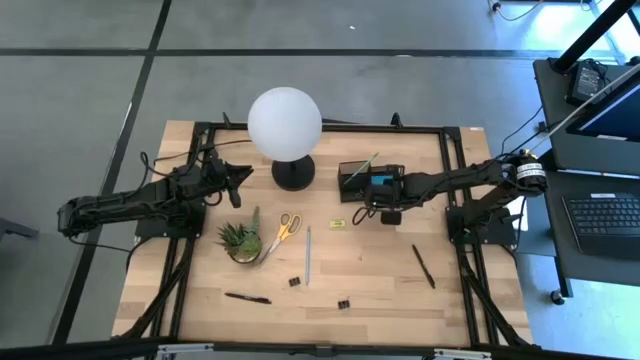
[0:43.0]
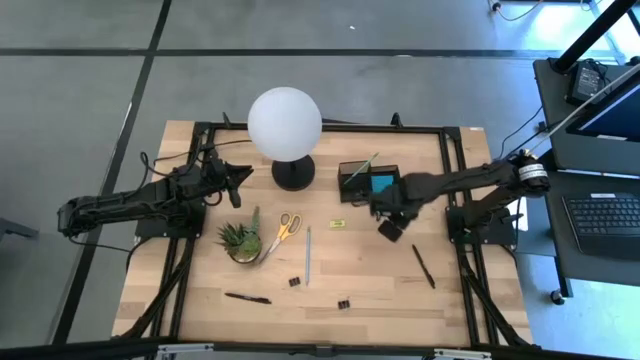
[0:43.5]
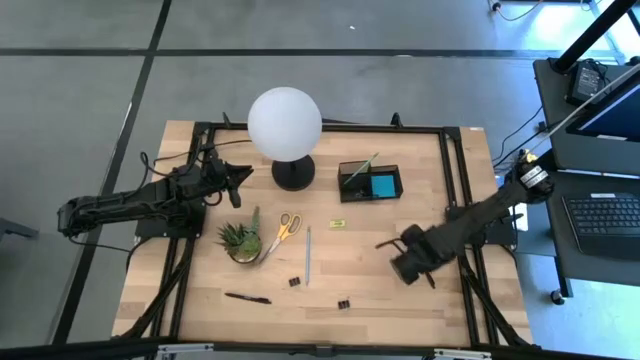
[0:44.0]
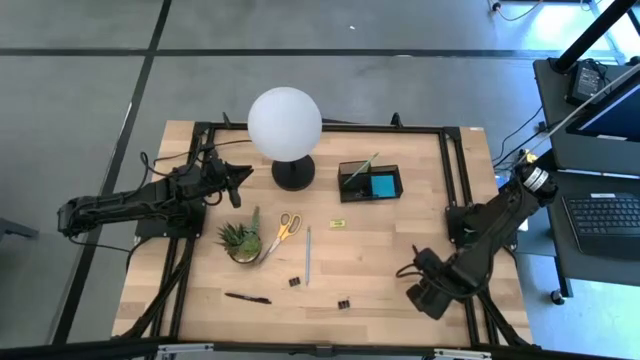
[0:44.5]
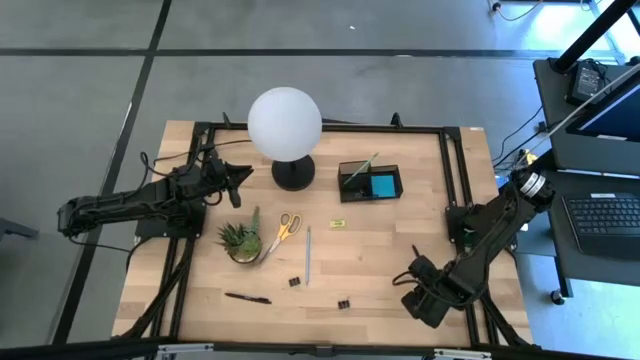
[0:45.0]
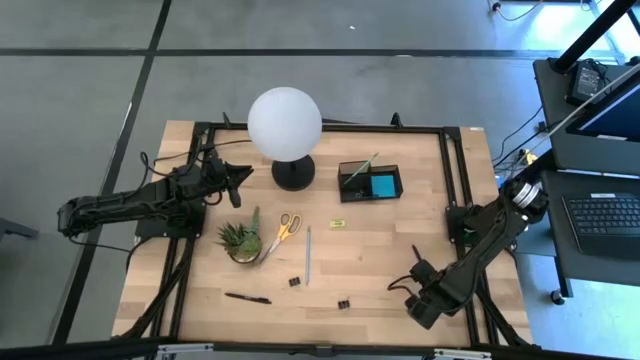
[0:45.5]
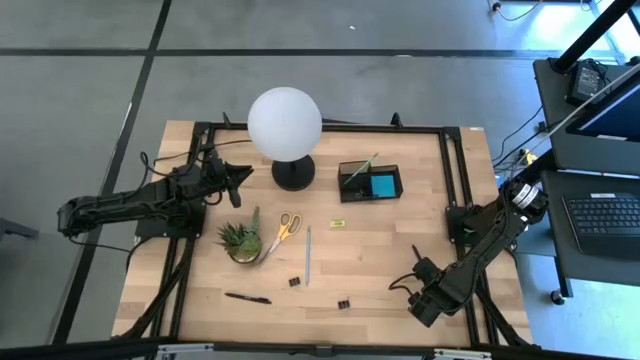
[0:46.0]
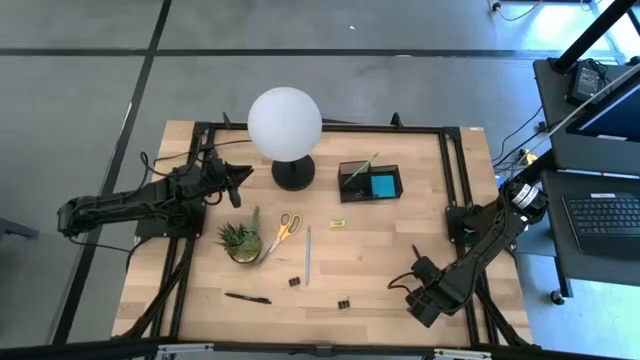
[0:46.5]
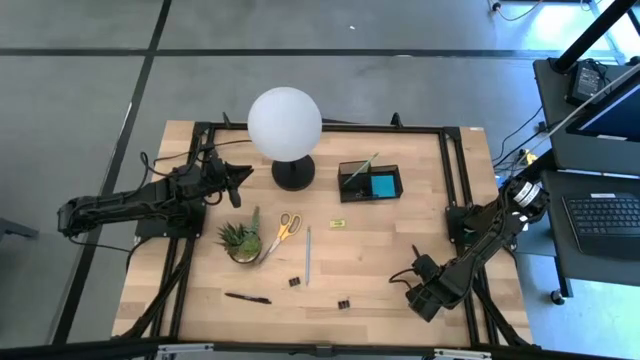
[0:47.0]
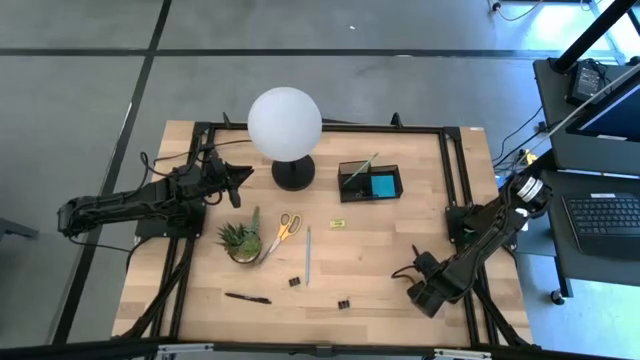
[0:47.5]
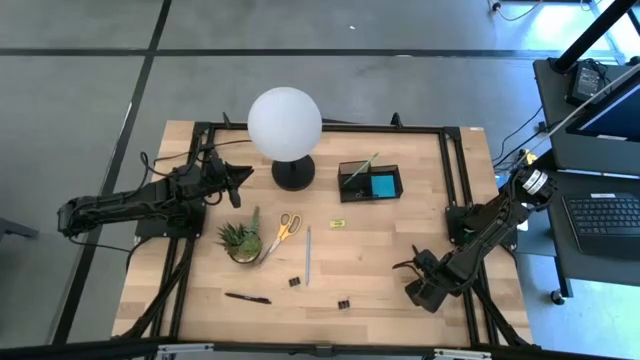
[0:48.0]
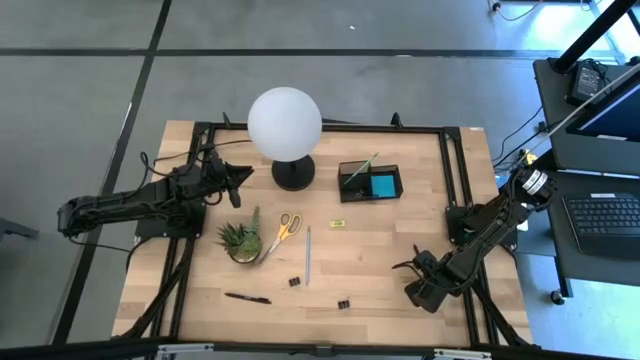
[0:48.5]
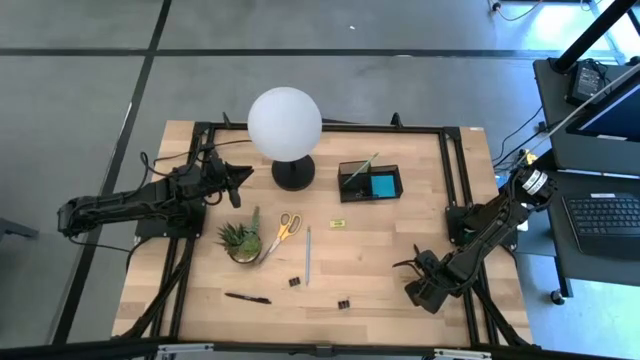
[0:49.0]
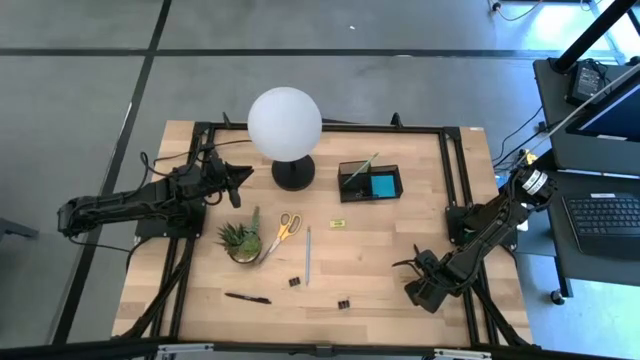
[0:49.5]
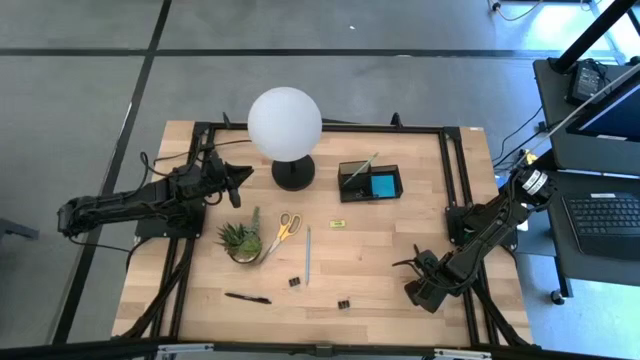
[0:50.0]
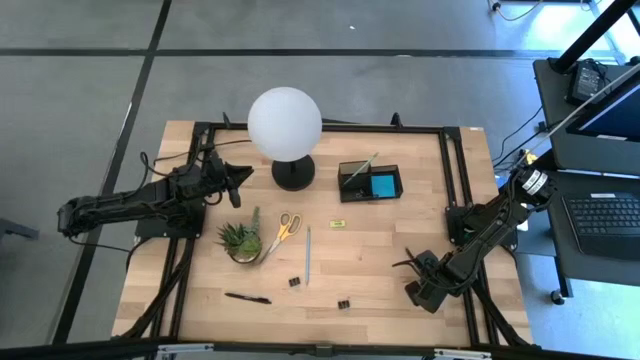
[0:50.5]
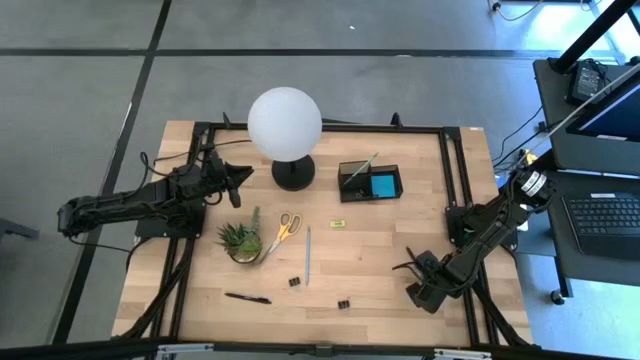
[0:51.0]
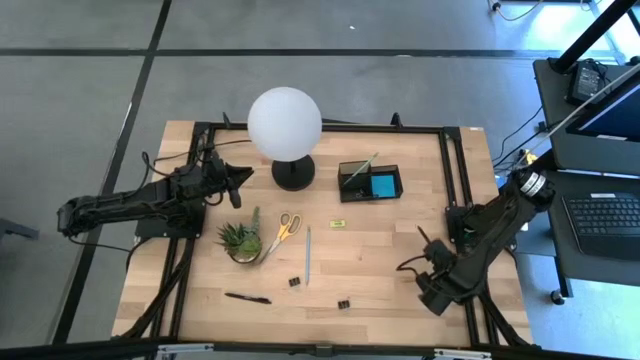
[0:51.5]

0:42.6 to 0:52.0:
Task: Pick and place office supplies into organizer
Put the right black pen into the desk organizer

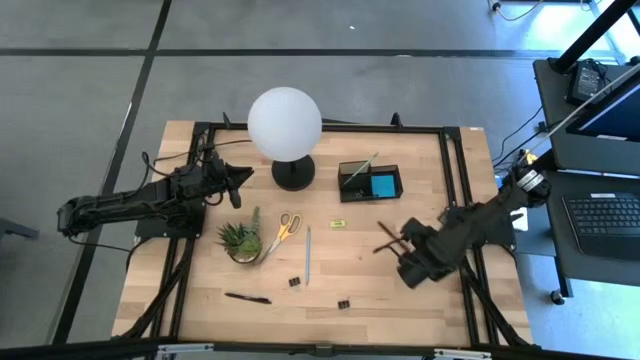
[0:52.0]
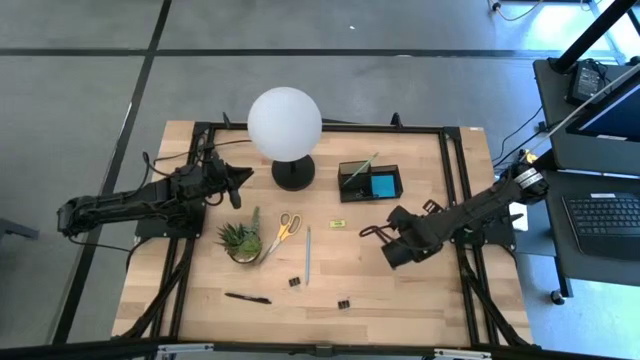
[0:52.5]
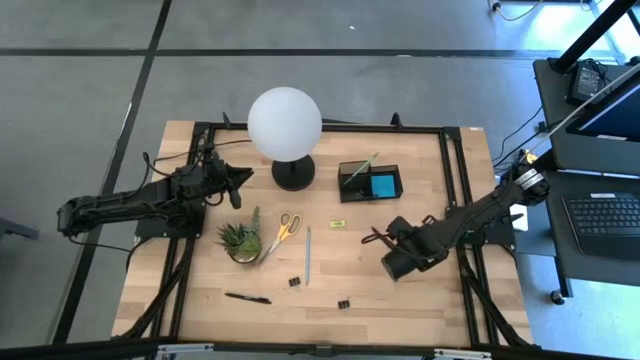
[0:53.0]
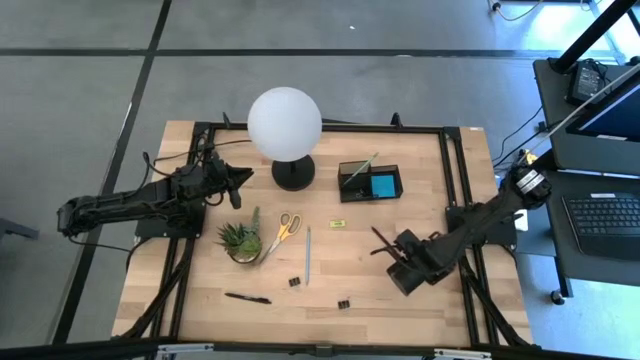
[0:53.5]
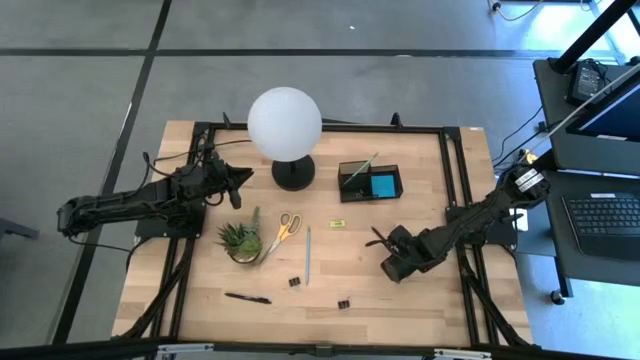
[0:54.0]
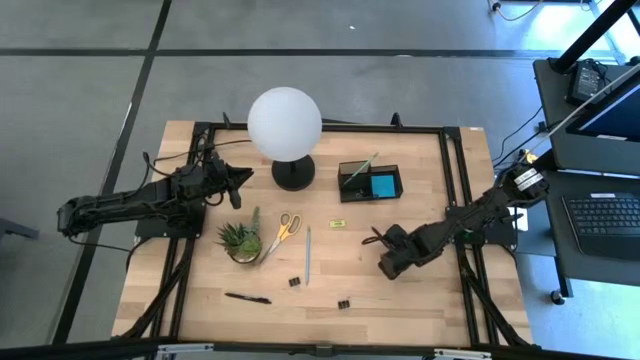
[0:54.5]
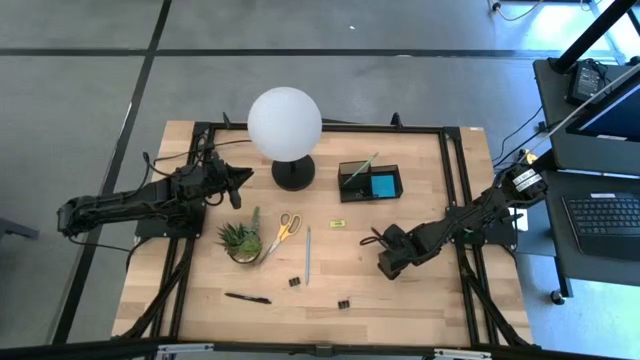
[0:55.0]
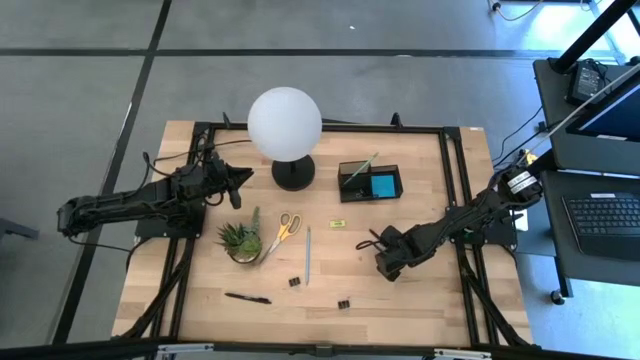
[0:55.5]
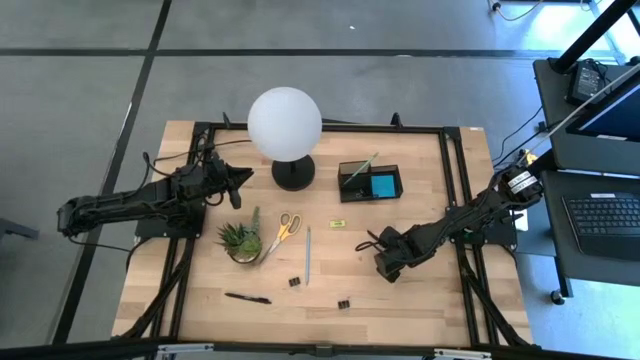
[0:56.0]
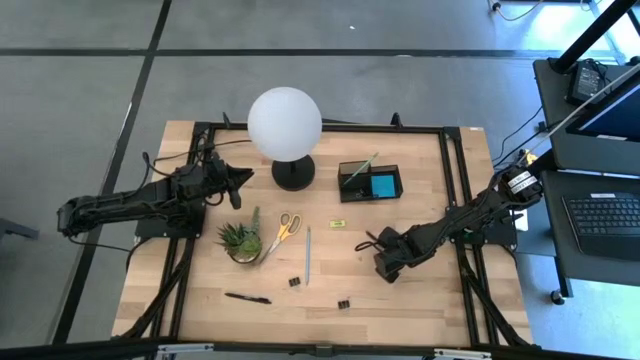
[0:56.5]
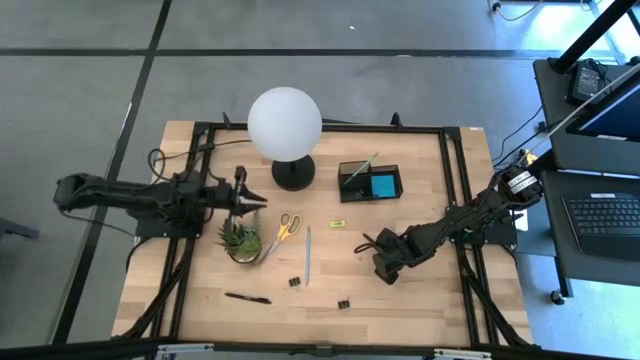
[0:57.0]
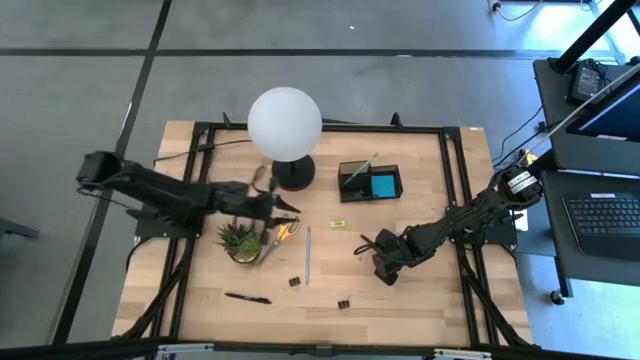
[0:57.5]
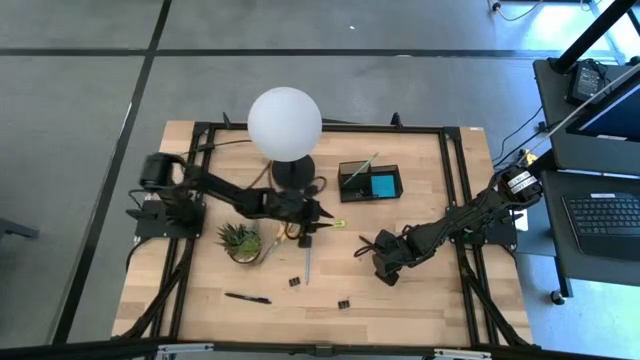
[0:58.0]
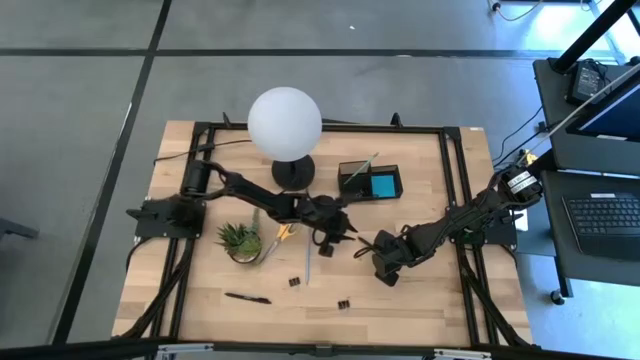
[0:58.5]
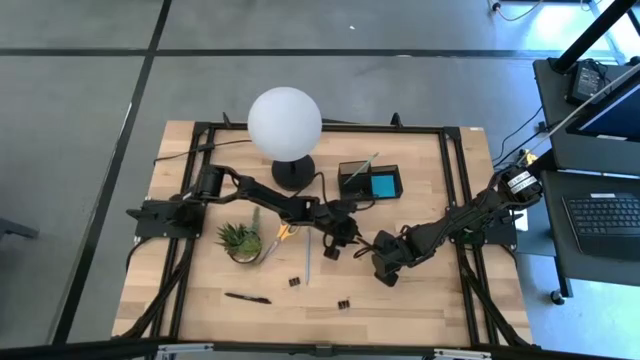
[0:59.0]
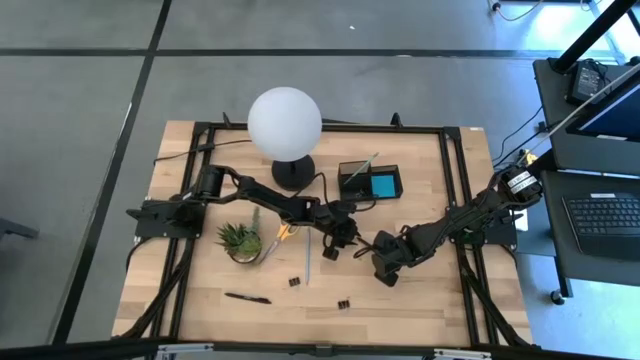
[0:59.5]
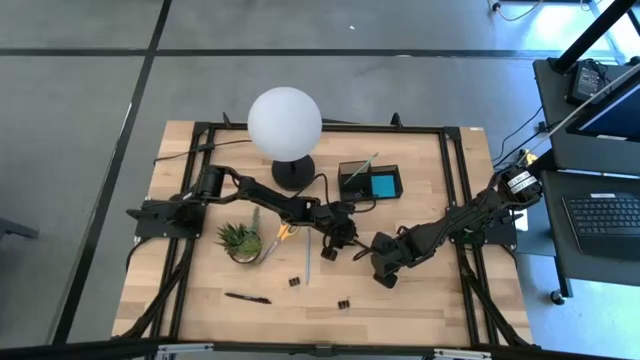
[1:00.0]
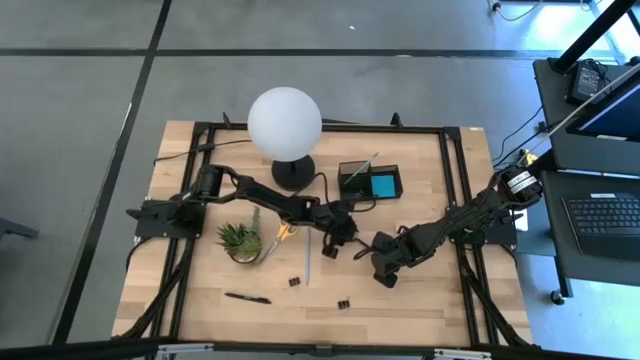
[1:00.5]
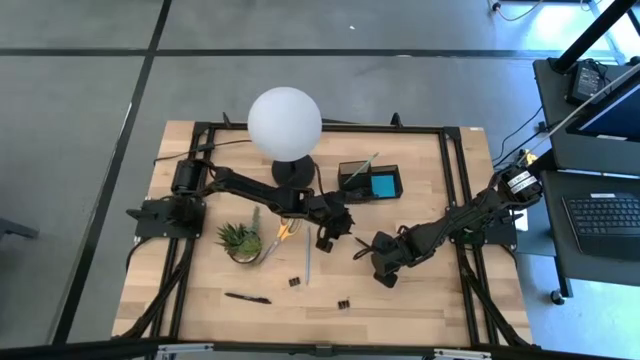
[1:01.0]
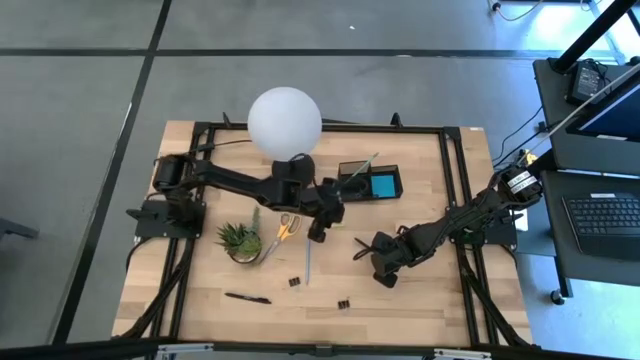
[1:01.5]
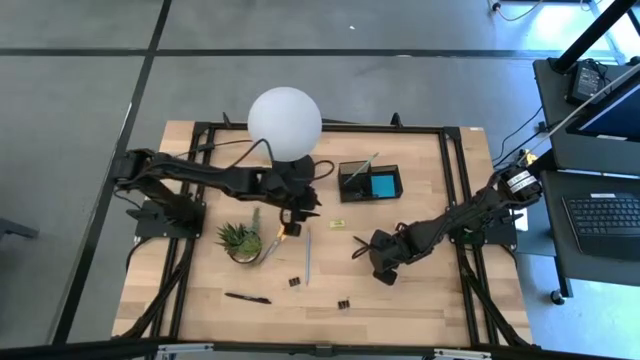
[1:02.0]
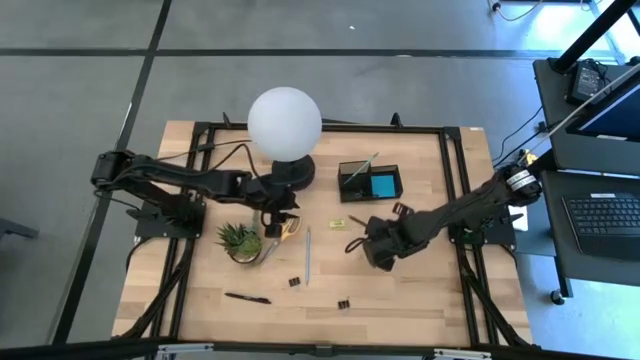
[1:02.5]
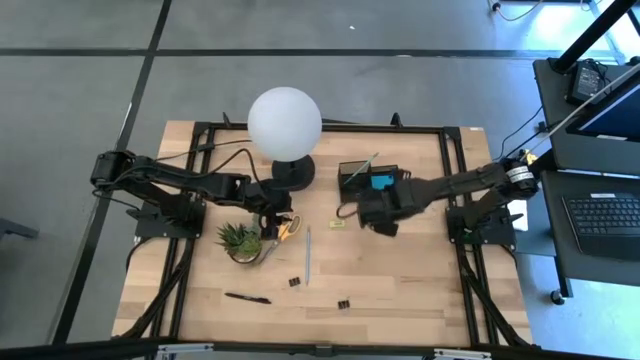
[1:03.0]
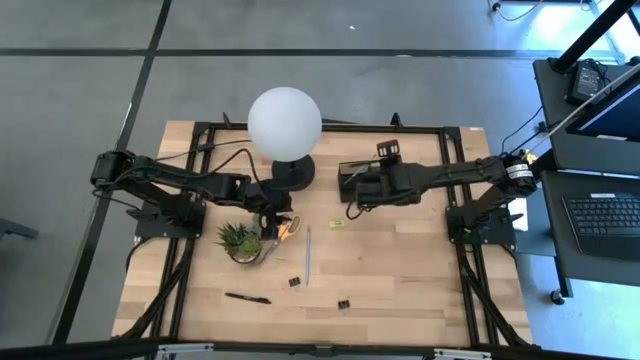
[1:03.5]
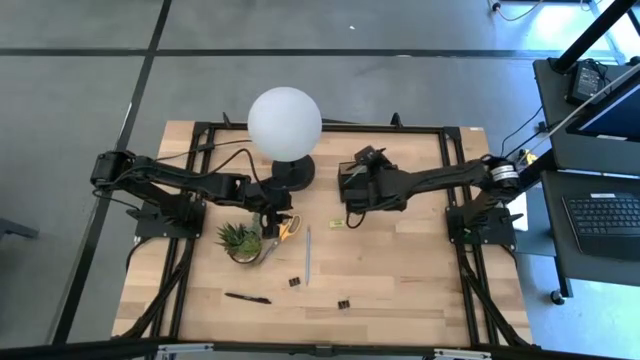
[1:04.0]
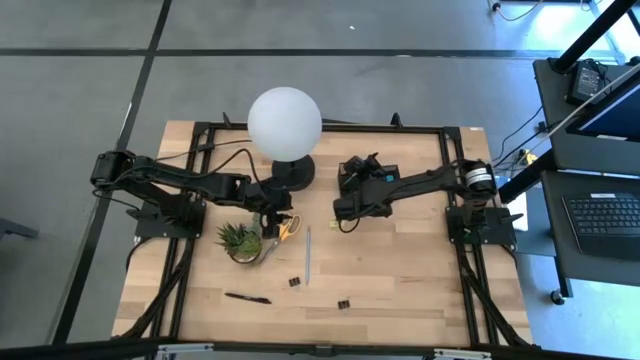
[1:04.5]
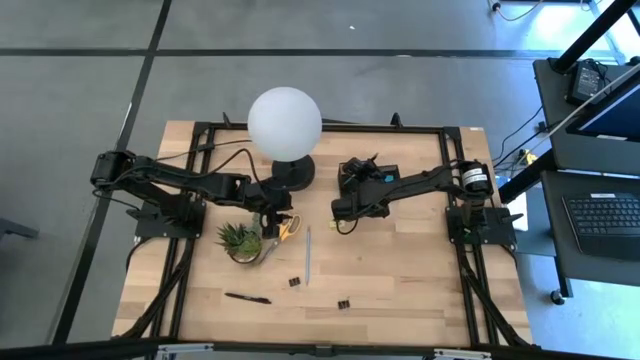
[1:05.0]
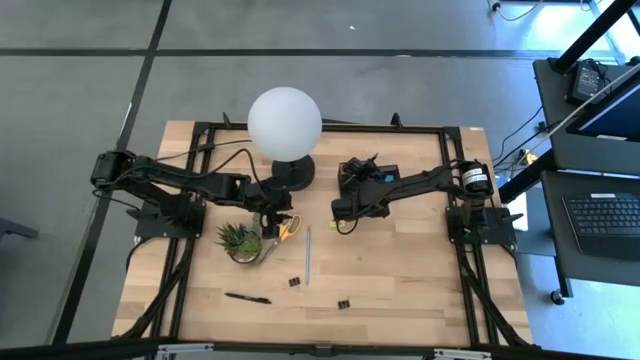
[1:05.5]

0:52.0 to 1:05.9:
Put the right black pen into the desk organizer
